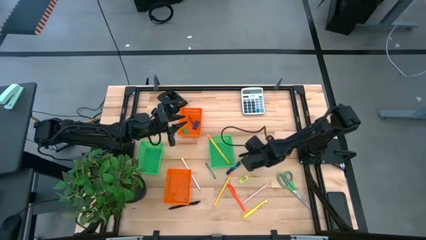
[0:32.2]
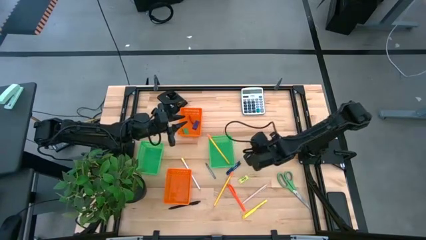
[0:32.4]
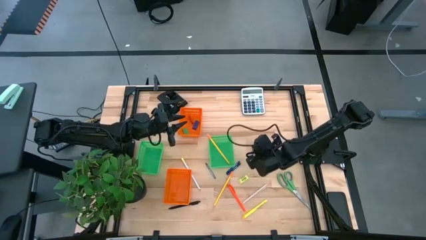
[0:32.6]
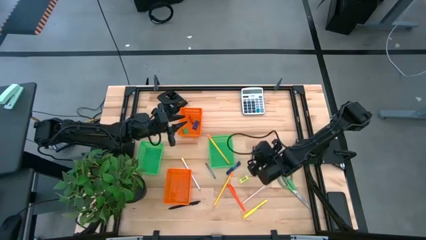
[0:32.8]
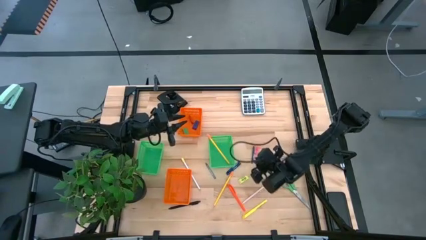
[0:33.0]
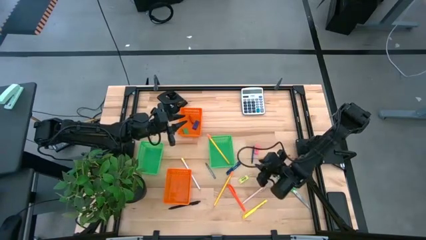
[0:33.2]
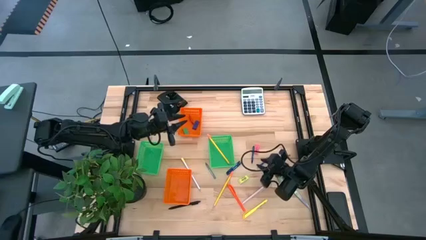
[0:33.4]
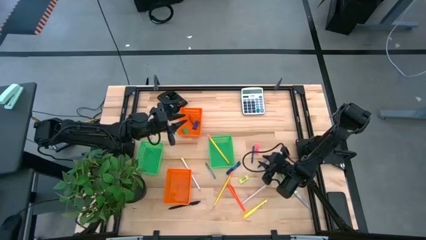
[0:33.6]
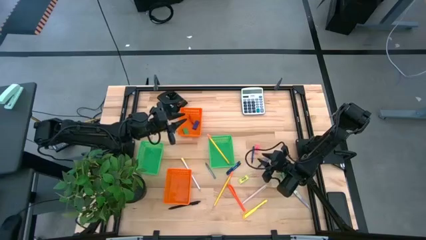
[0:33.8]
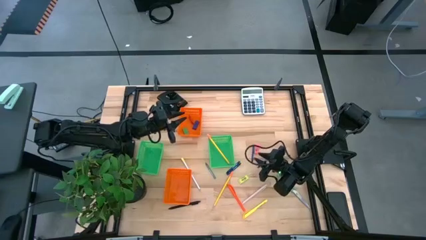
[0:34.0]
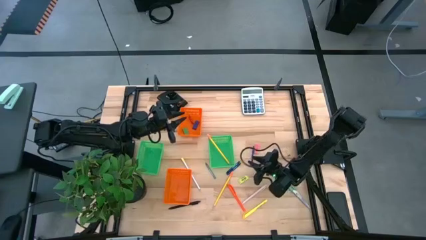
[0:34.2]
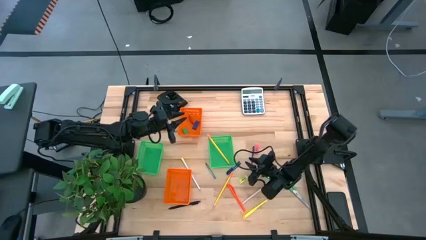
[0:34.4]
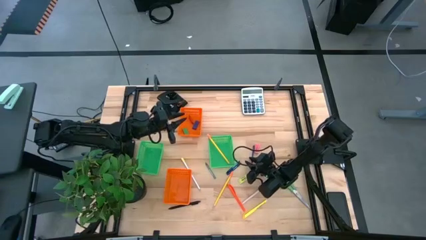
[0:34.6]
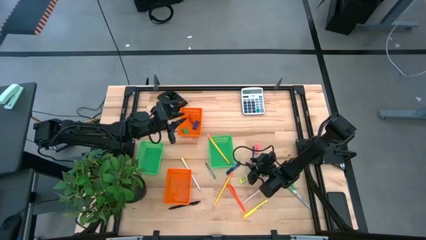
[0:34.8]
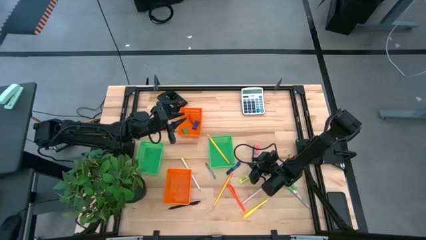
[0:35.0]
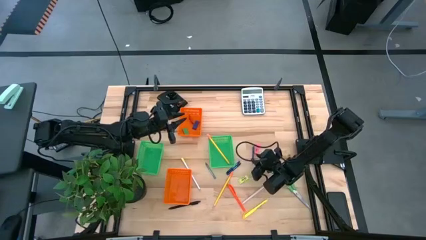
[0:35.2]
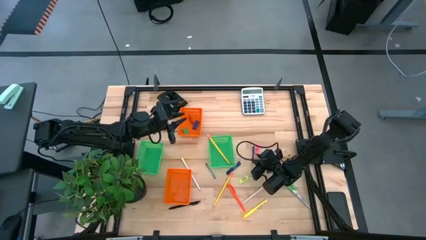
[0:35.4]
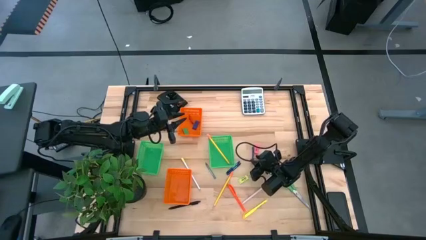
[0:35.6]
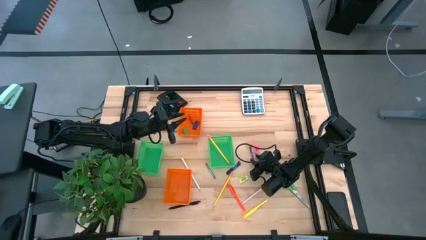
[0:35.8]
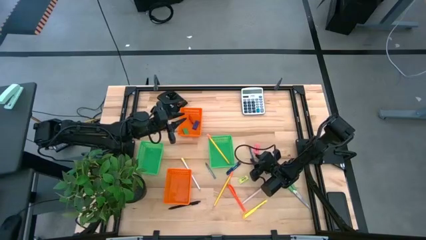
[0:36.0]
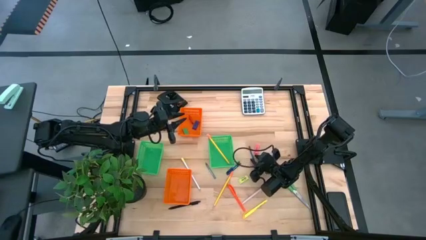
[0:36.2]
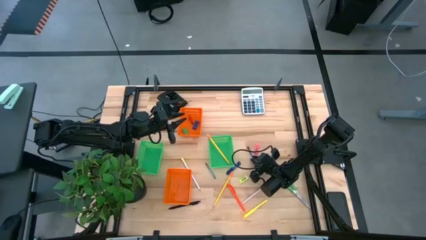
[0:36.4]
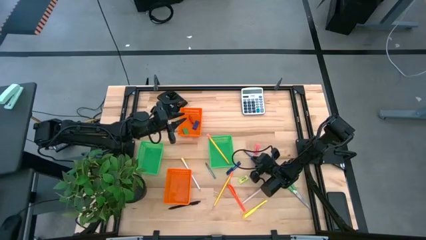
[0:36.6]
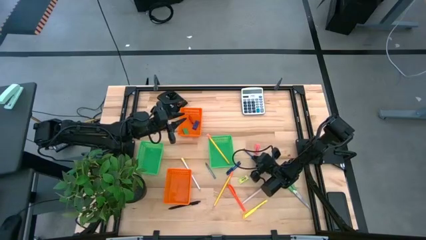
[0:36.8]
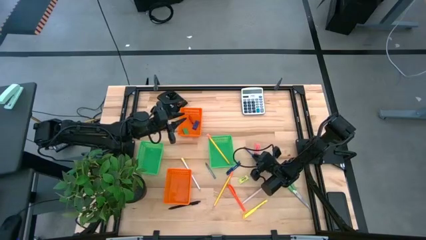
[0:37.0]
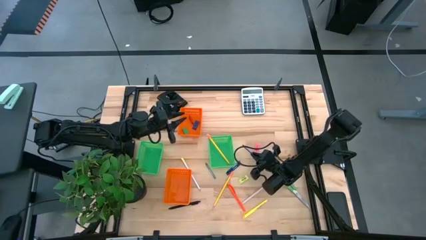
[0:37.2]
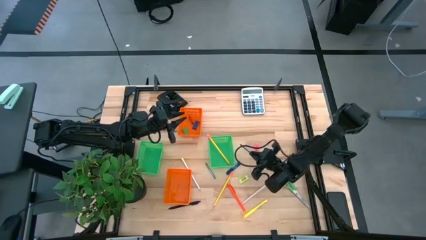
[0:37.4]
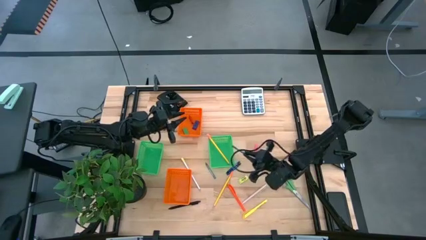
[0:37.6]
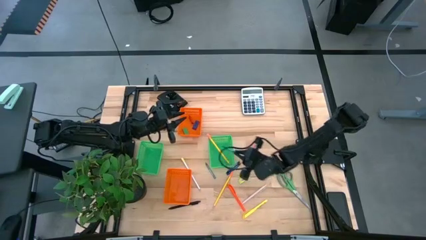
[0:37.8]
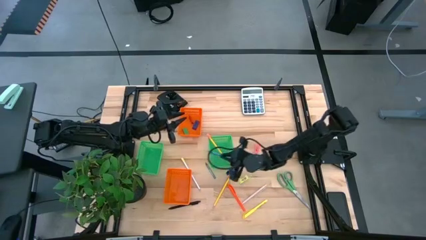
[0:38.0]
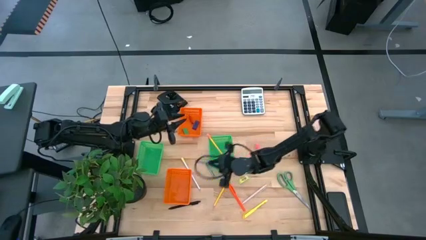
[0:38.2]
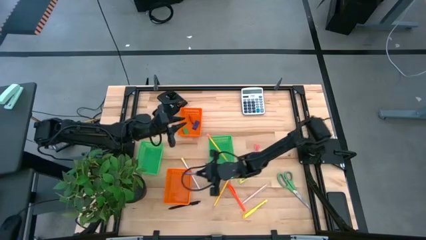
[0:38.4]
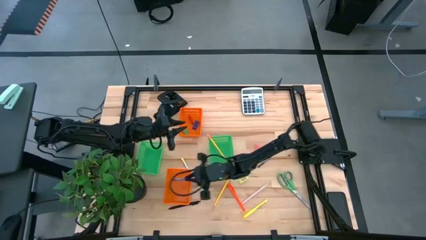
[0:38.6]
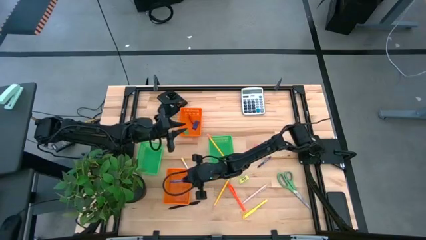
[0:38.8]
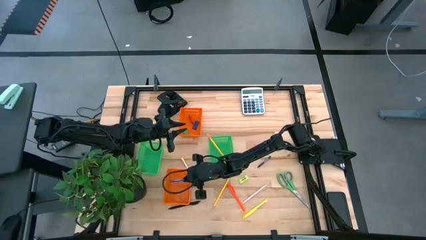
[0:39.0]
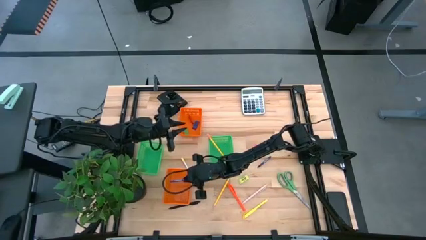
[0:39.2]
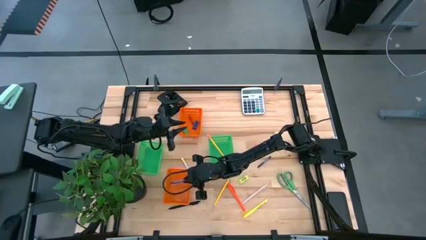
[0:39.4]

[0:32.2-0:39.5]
Task: Sort crayons/erasers/pens/pencils in bins
Put the blue crayon into the bottom orange basket

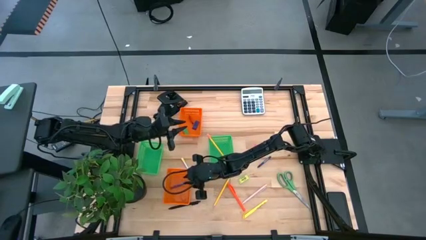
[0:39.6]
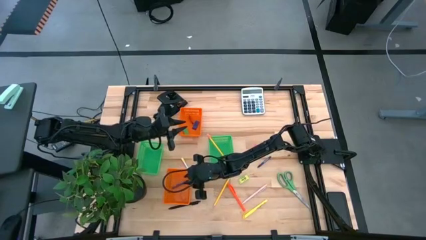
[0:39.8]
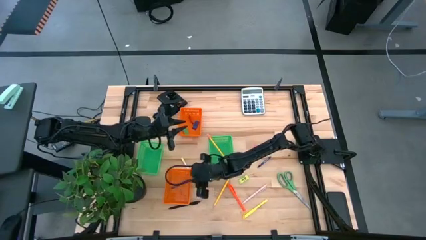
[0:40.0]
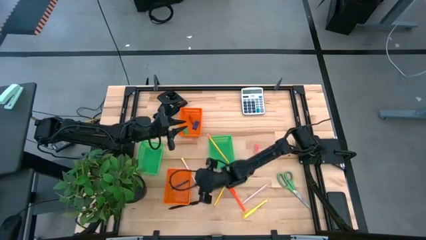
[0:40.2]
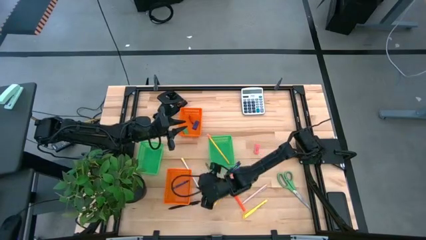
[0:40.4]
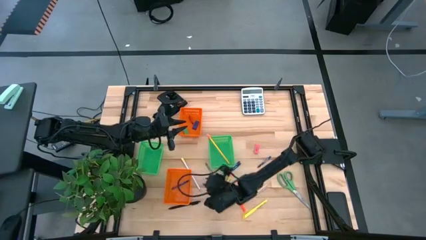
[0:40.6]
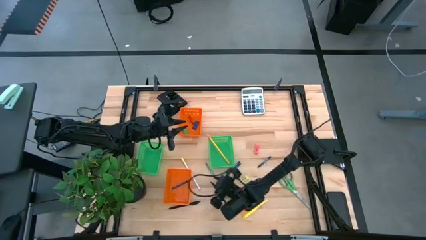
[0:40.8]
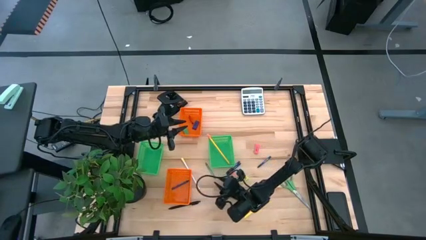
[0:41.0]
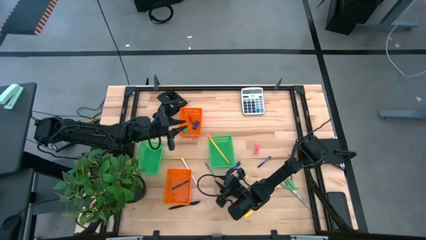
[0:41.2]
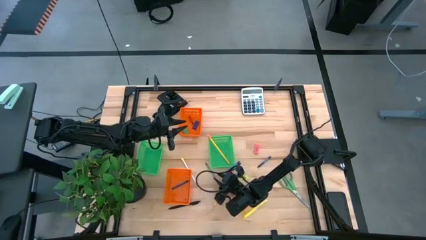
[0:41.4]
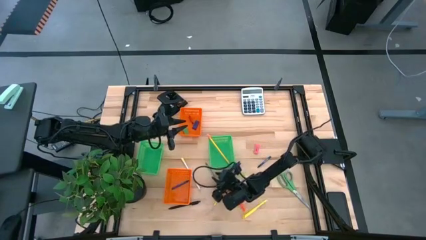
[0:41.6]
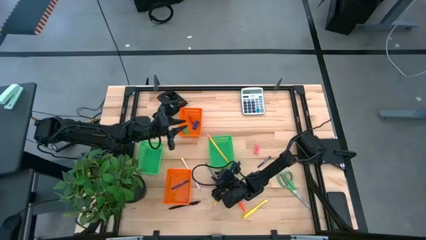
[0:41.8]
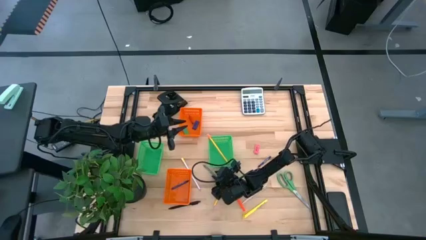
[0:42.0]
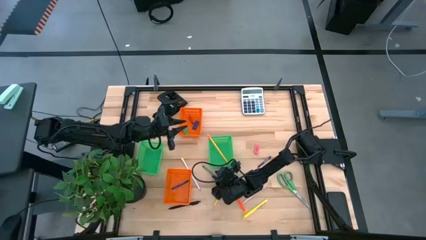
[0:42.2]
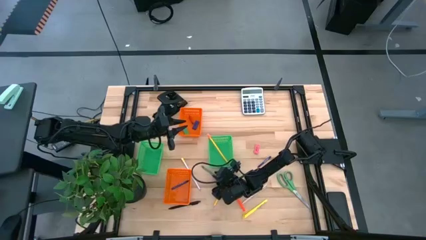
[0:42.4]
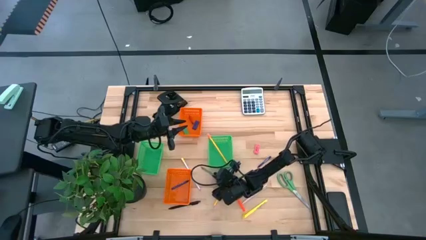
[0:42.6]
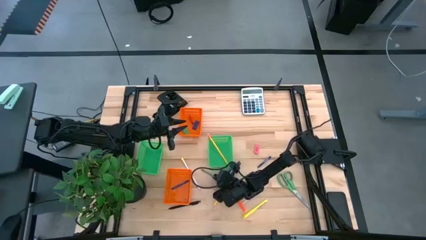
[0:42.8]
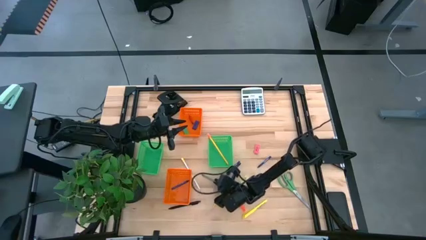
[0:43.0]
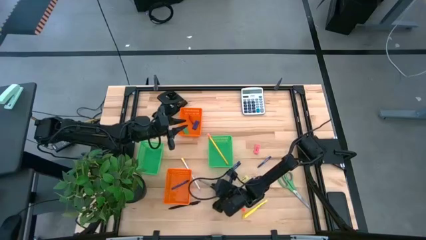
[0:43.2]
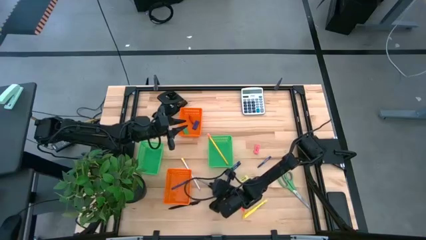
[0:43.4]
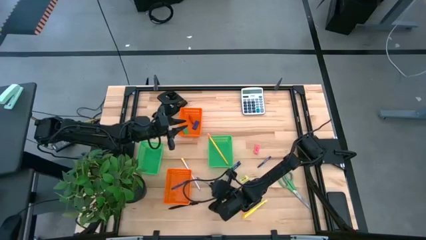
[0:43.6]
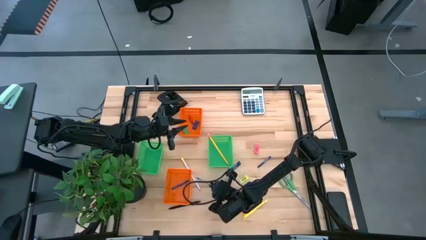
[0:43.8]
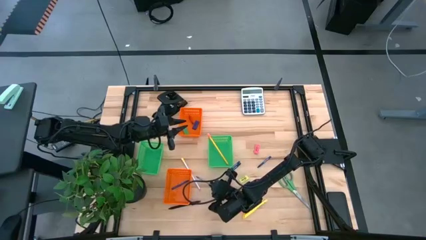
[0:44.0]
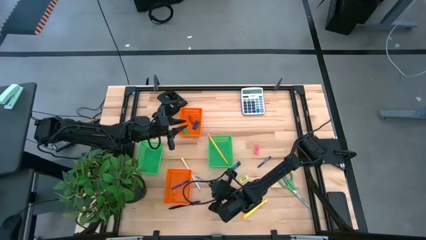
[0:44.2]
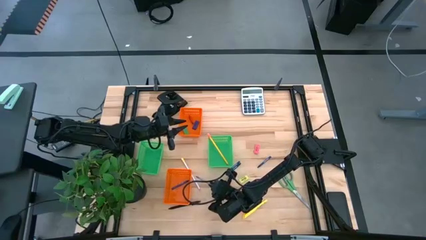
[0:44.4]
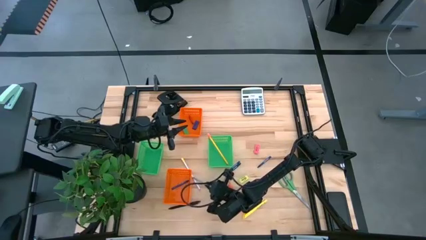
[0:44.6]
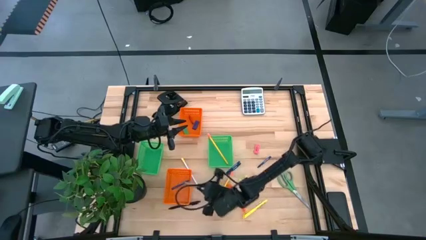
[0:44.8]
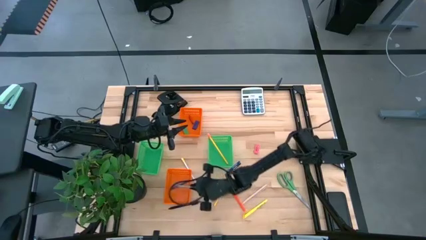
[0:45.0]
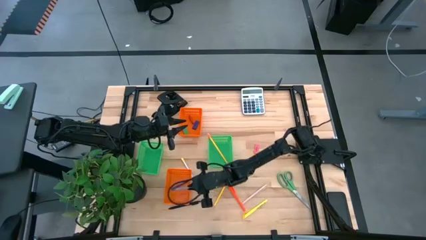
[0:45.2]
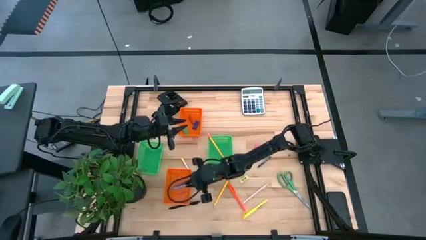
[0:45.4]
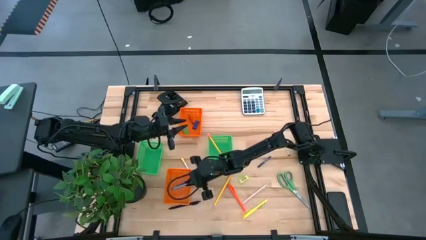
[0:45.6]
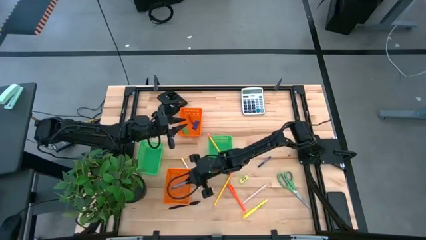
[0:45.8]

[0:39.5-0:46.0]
Put the gray crayon into the bottom orange basket

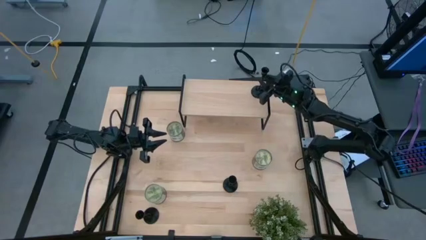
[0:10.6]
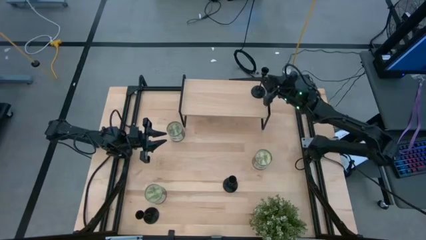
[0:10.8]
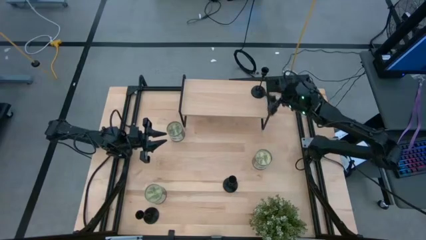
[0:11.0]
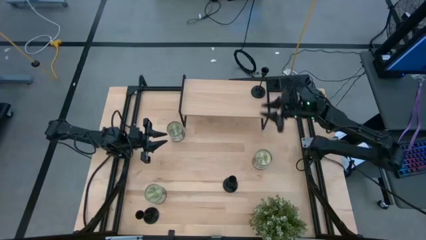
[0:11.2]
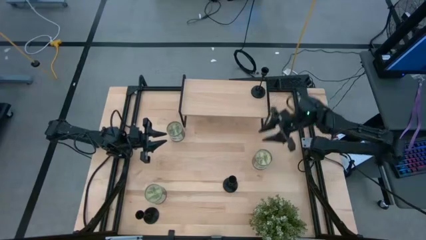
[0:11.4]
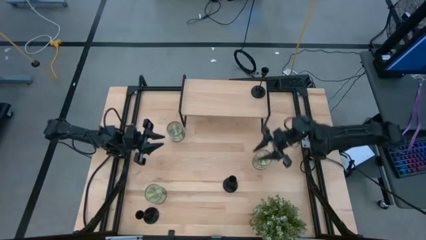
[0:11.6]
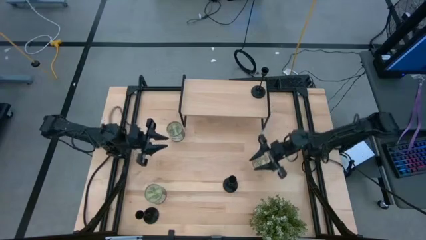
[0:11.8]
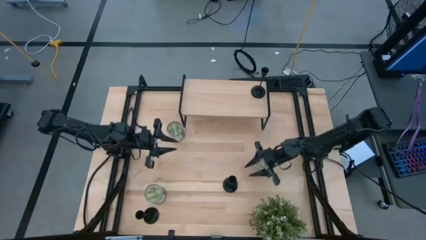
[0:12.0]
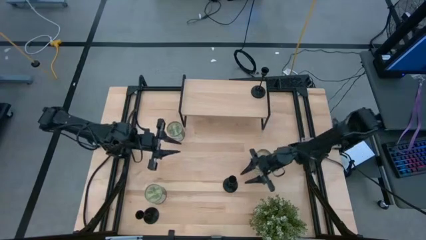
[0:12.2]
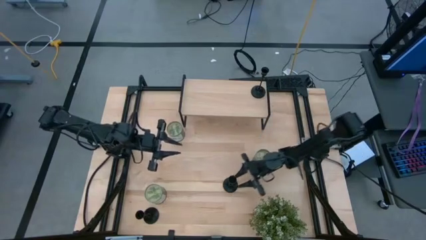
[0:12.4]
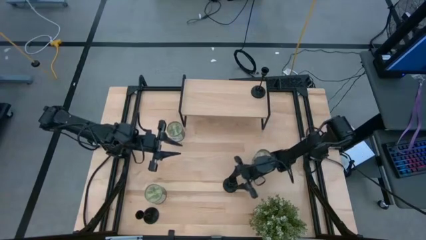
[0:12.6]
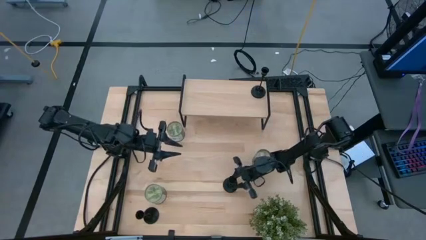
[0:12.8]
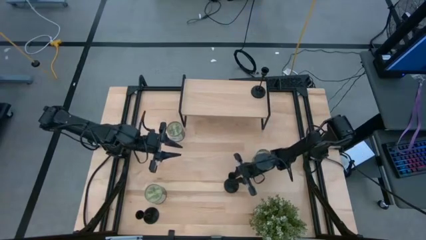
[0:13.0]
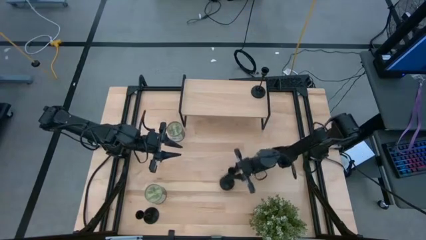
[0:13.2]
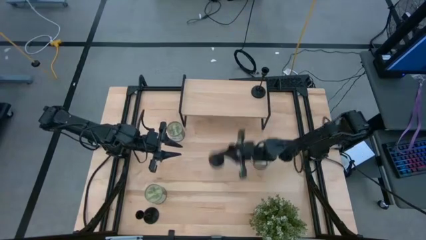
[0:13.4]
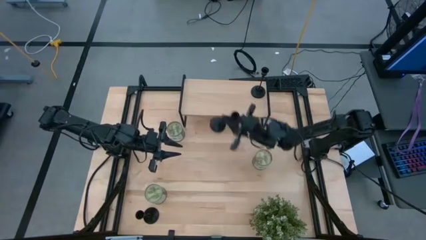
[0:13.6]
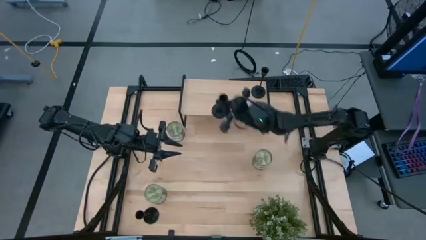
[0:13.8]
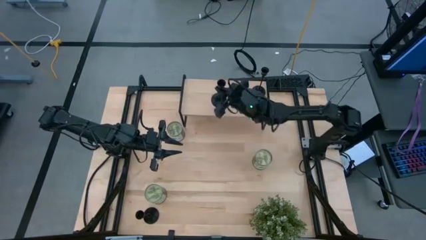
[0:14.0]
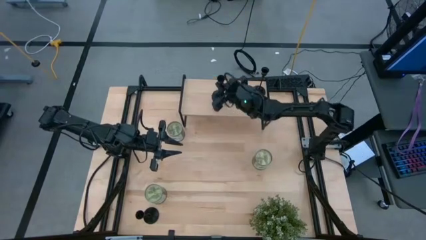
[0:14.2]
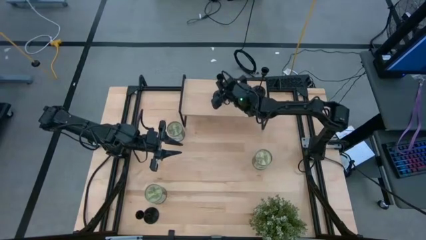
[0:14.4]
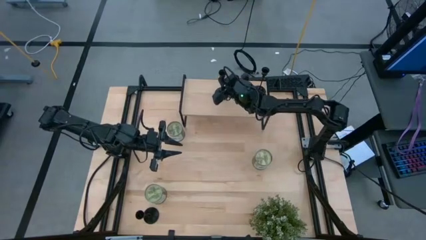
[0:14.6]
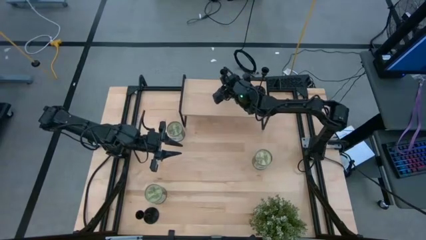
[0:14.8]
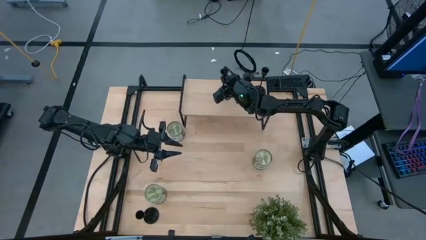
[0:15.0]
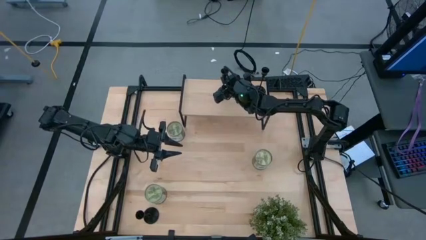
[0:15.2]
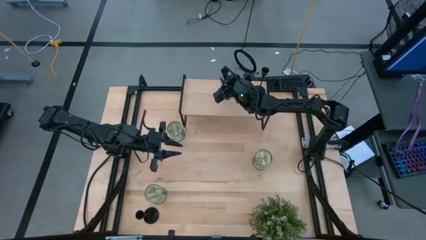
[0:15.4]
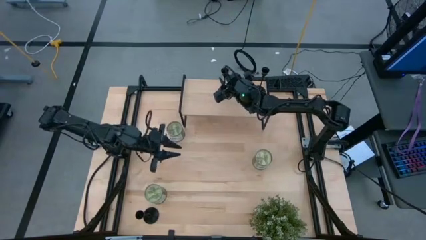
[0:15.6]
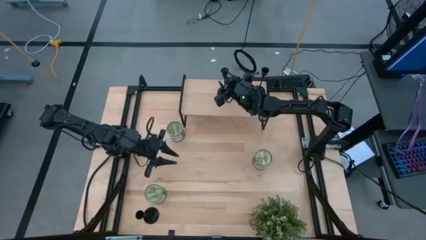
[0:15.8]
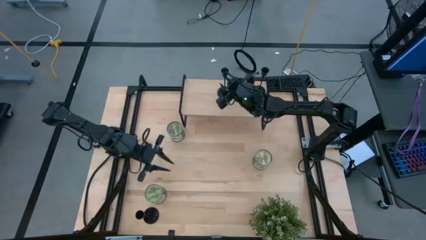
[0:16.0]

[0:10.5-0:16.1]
Task: Pick & Place candle stick holders
Put the right candle holder on the shelf
